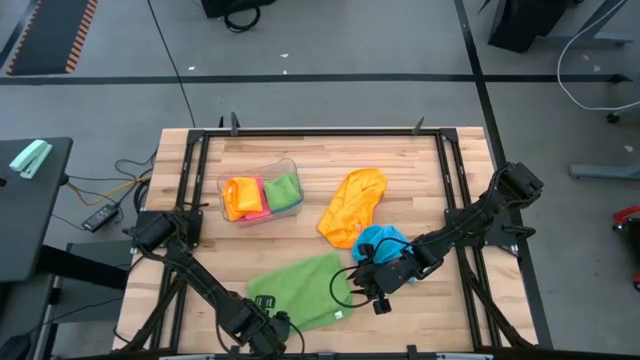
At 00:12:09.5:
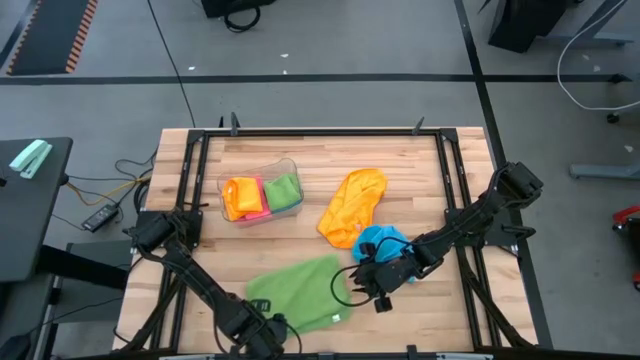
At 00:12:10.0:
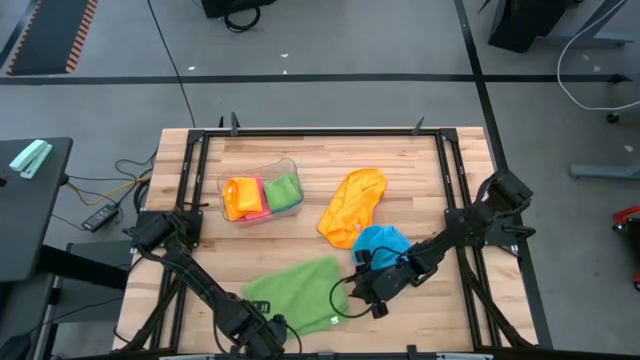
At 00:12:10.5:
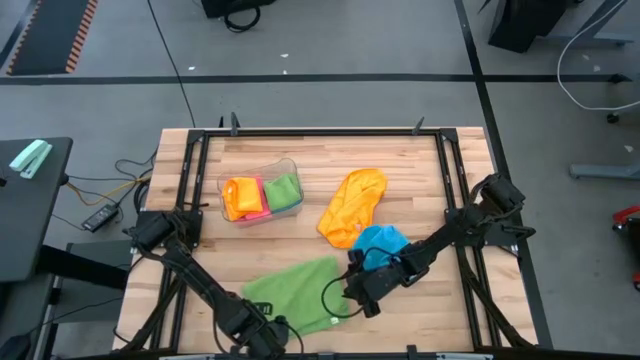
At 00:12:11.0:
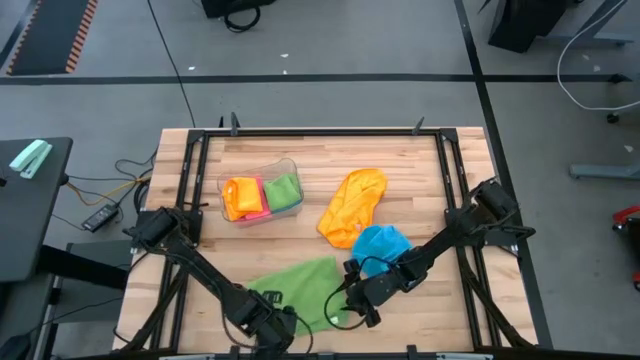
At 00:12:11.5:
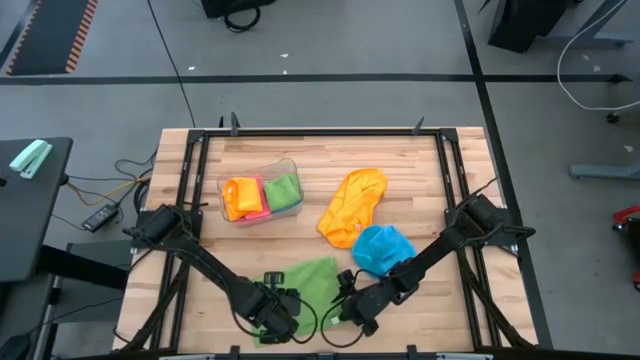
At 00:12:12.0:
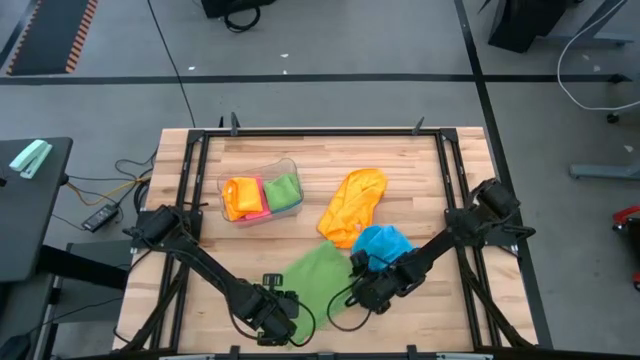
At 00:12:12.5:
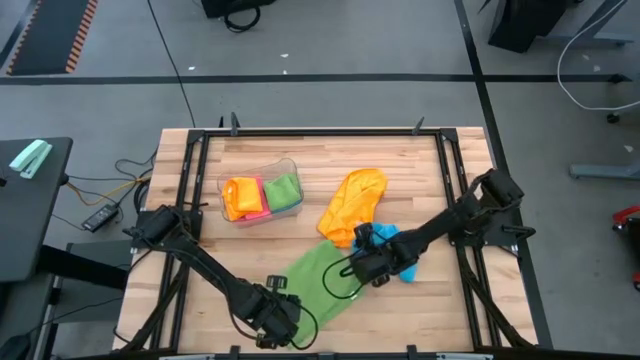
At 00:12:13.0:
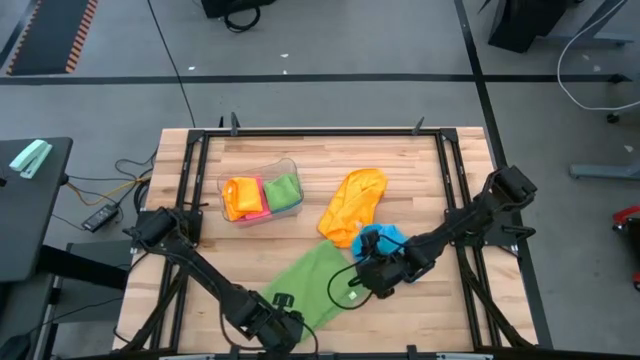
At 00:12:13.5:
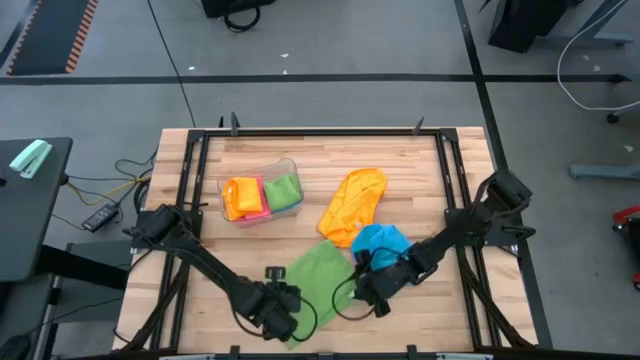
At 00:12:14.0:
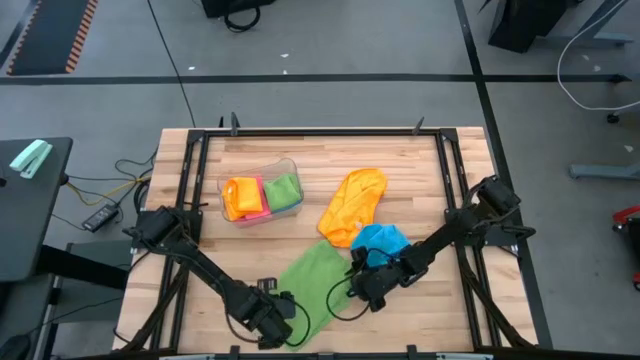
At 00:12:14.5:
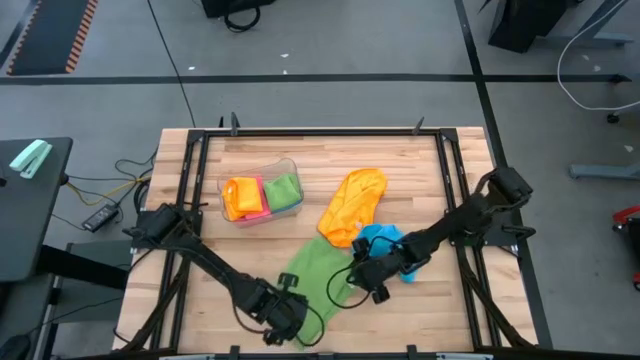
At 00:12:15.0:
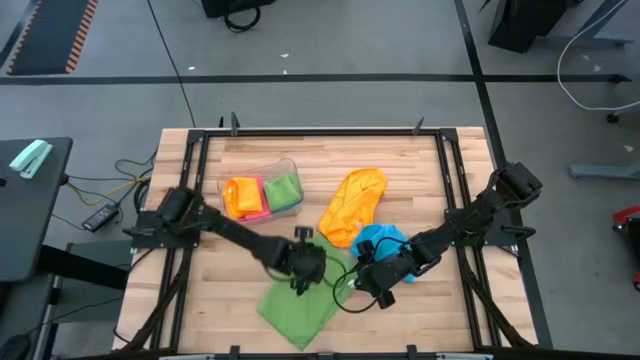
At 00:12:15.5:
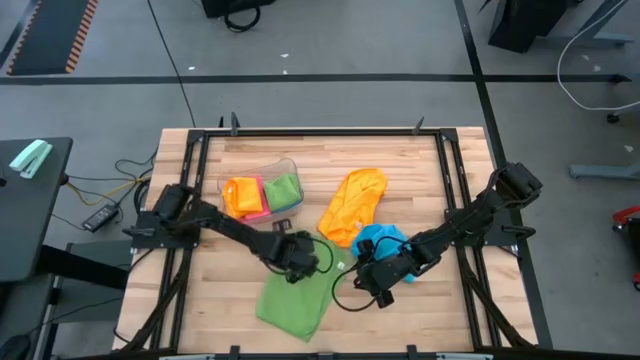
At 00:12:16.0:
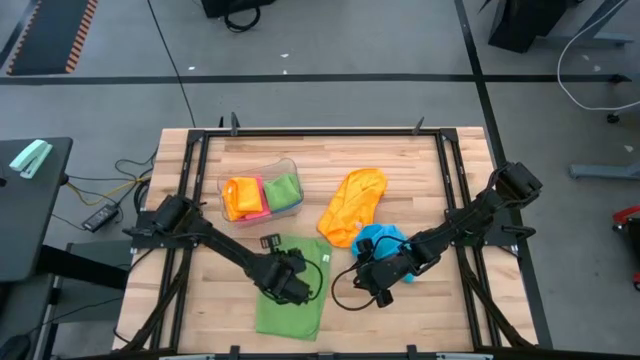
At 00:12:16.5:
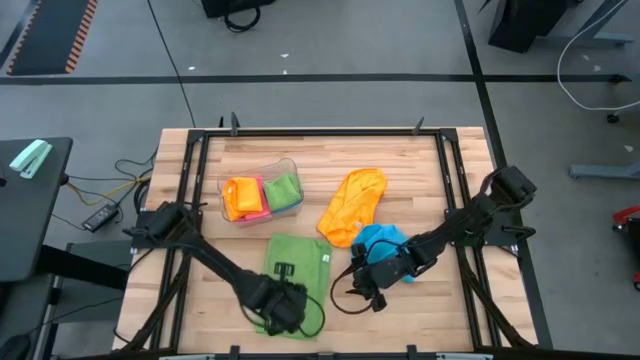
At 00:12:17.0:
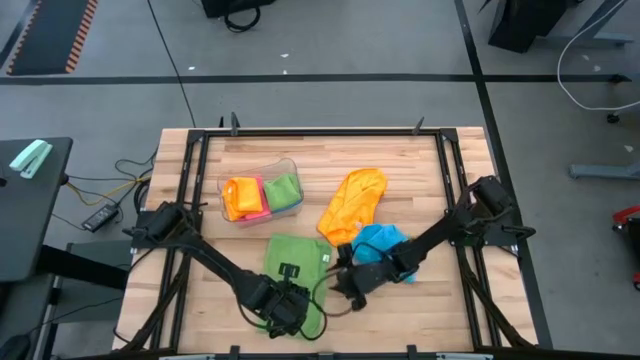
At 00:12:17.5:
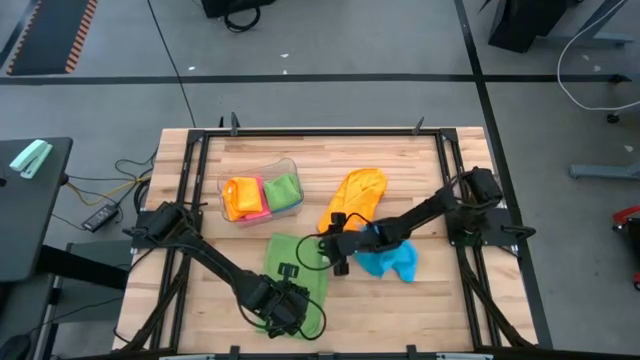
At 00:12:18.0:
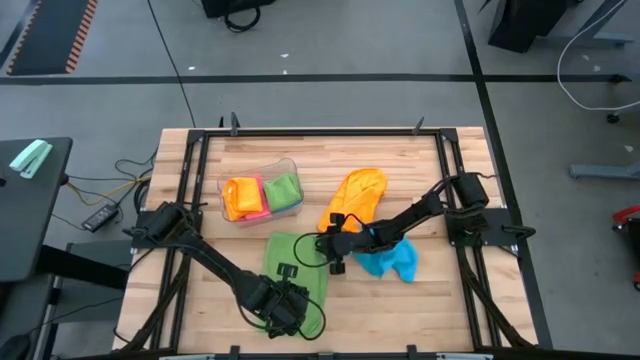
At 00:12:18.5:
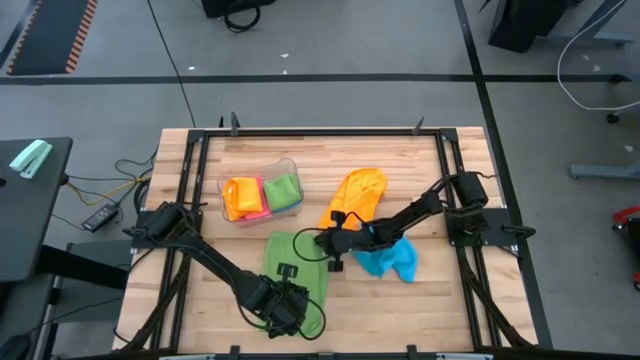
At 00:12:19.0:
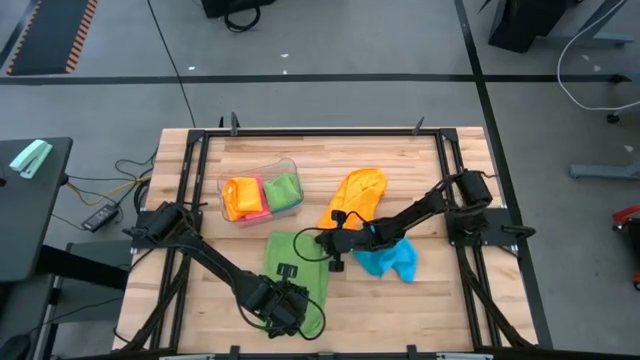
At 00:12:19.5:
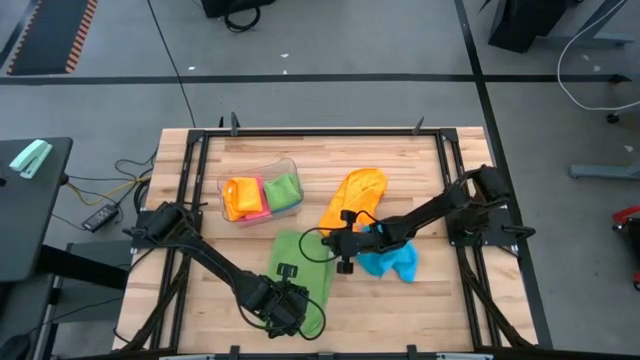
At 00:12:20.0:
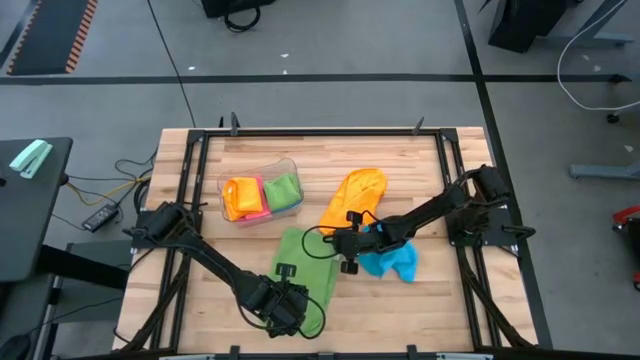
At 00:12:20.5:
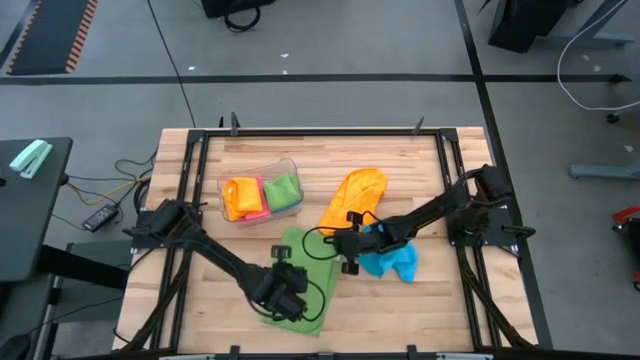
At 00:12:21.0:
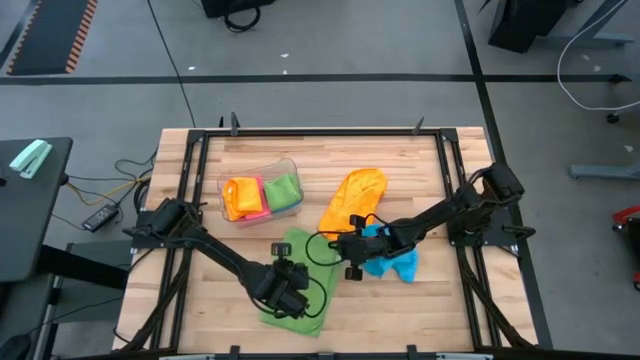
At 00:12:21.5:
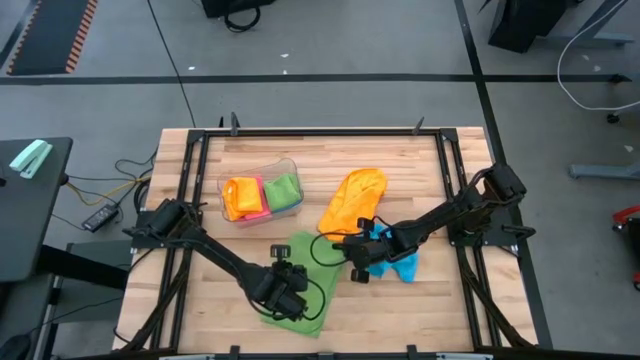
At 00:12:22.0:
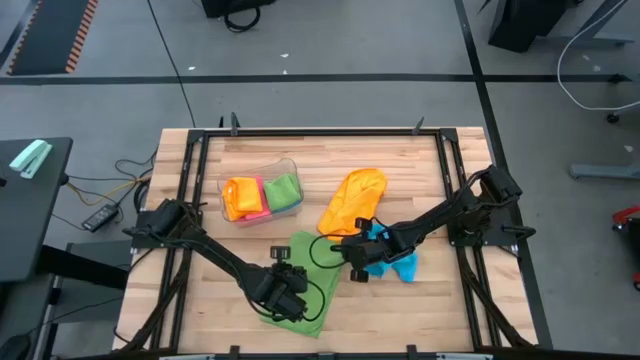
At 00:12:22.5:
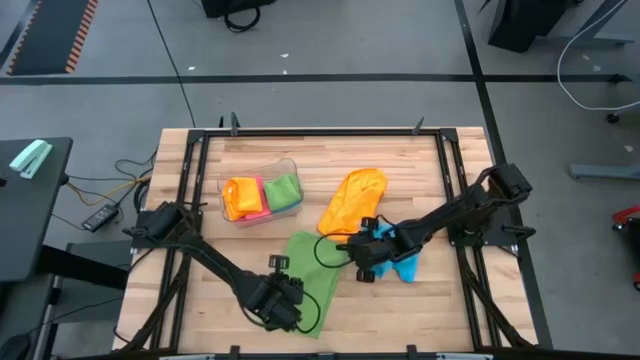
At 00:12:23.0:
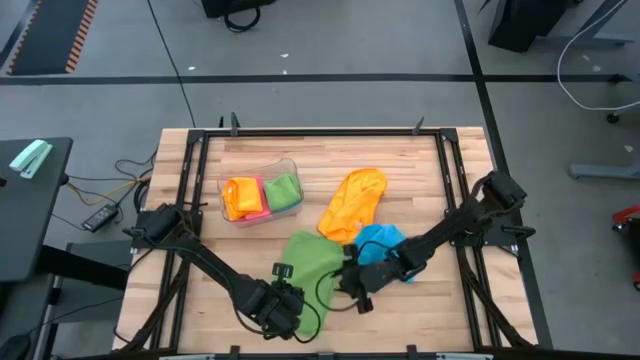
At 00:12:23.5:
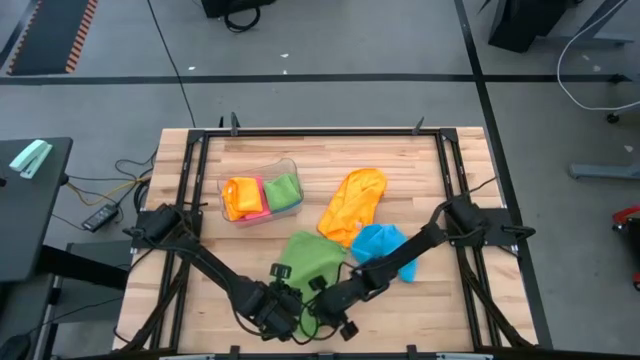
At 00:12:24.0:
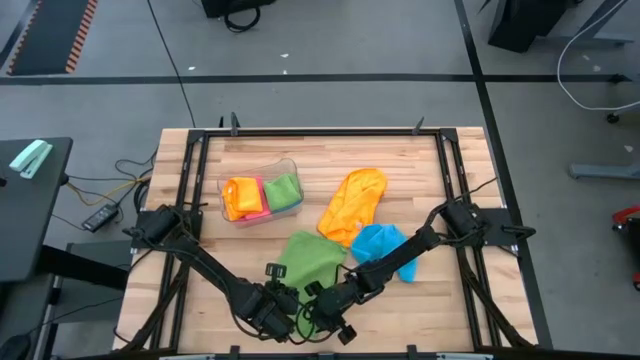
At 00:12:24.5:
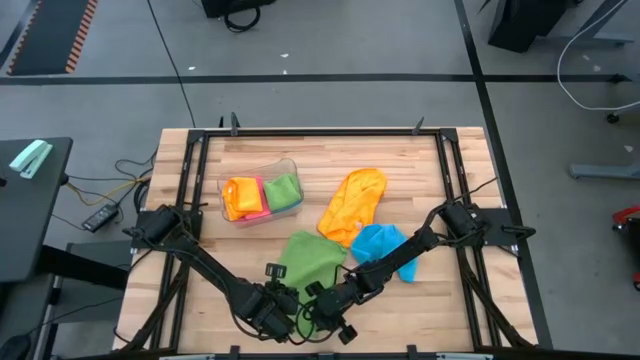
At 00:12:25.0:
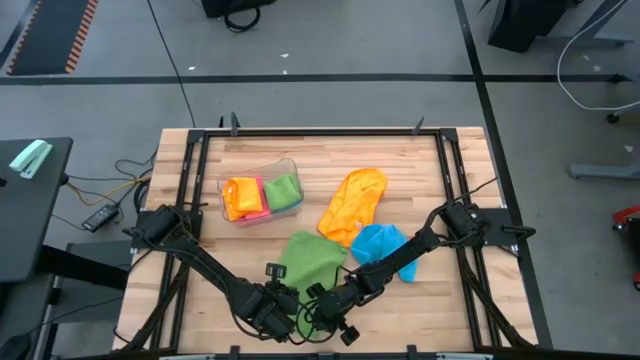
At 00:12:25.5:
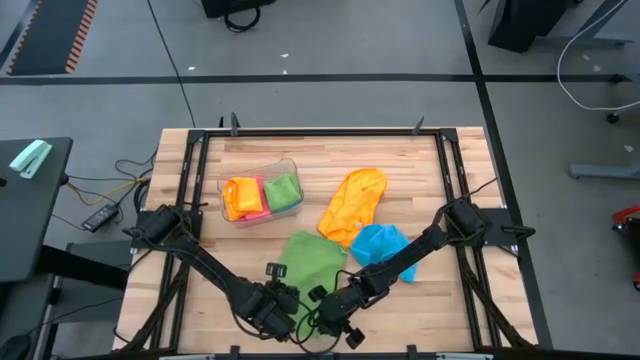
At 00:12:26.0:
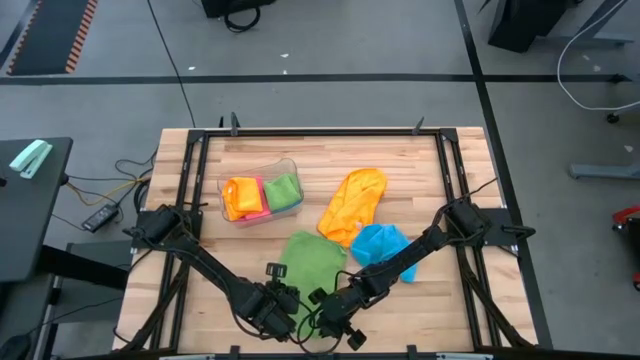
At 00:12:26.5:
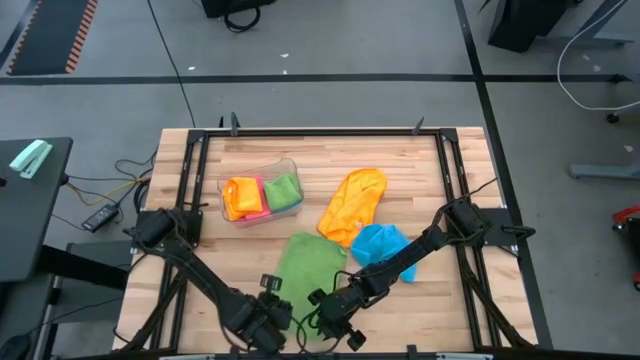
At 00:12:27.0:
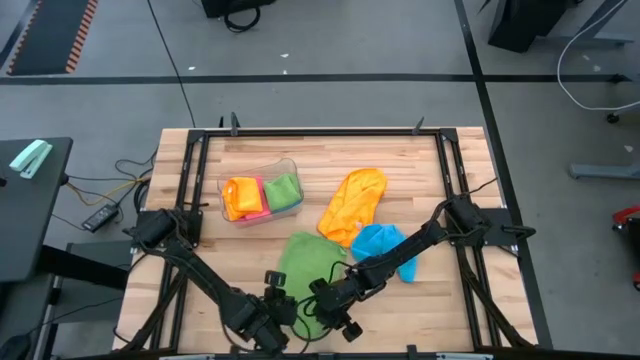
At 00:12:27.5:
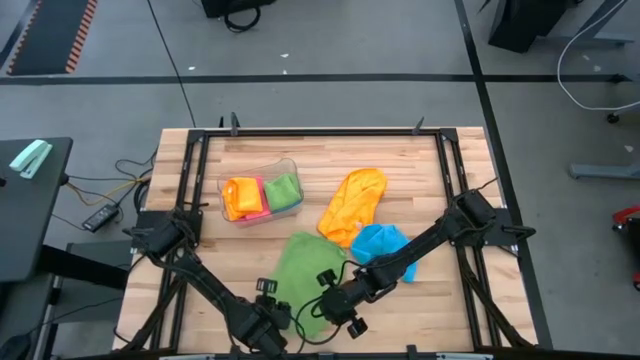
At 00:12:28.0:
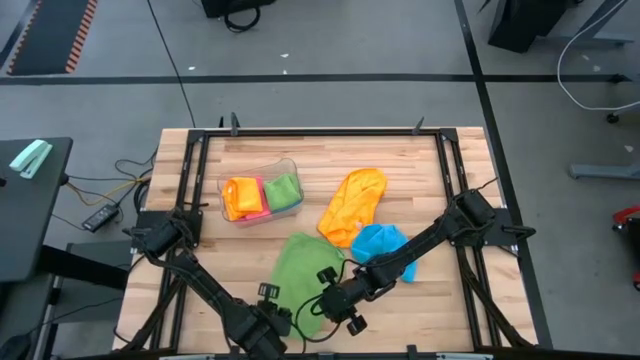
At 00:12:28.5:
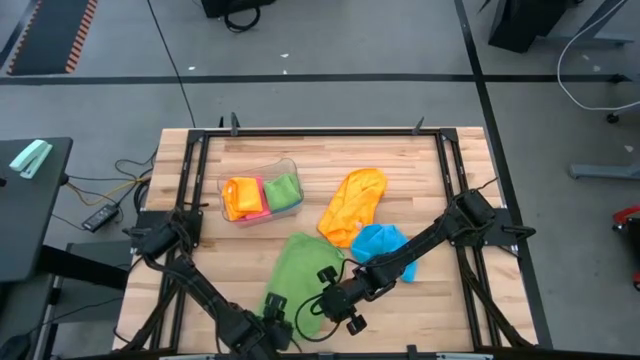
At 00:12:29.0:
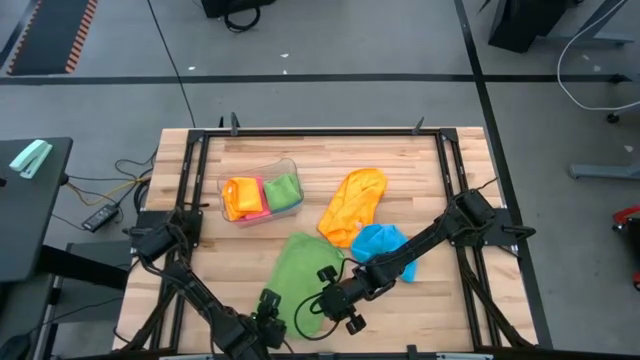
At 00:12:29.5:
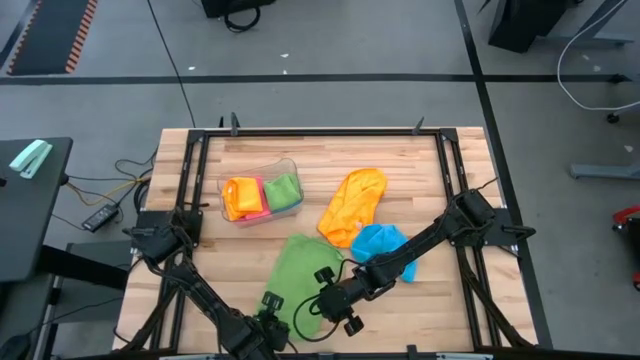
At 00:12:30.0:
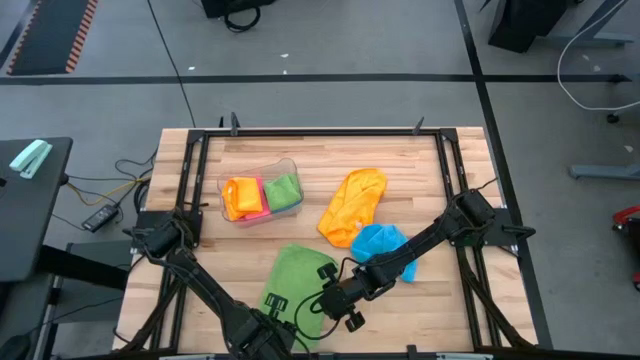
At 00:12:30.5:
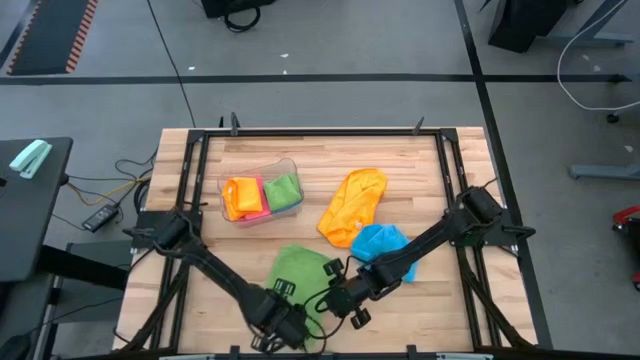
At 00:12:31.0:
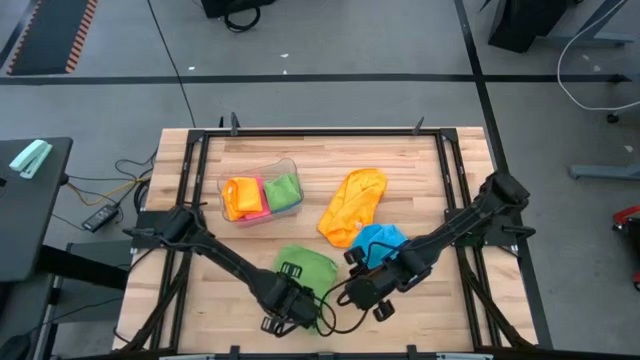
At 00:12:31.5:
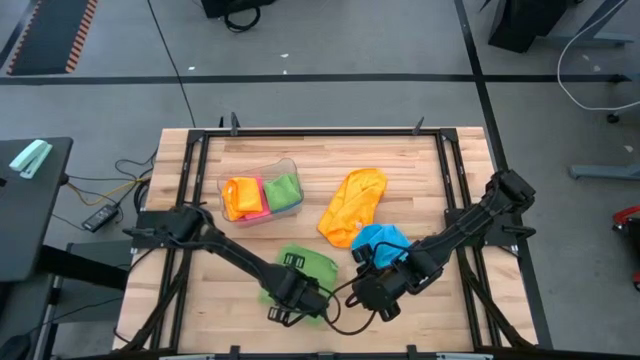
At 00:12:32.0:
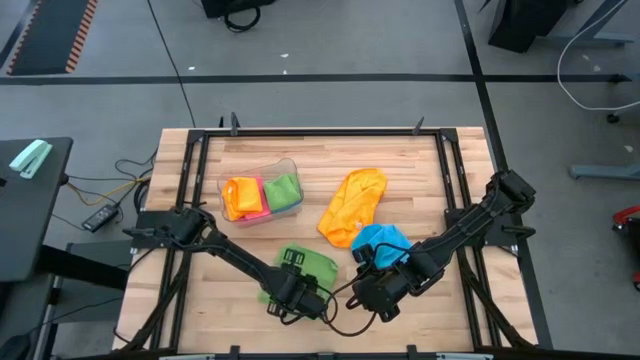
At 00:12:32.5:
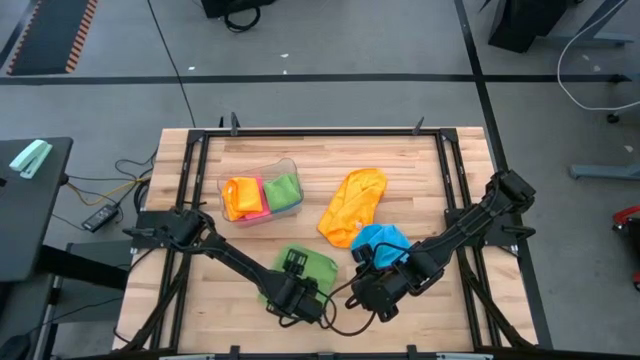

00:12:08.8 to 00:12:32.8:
Task: Fold microfiber towels
Fold the green microfiber towel
